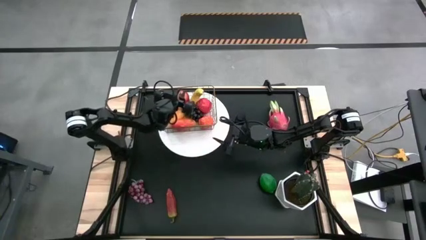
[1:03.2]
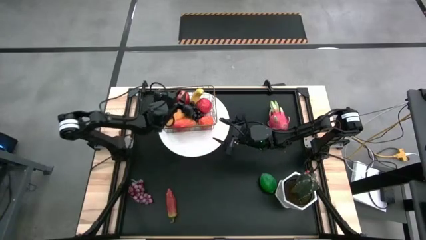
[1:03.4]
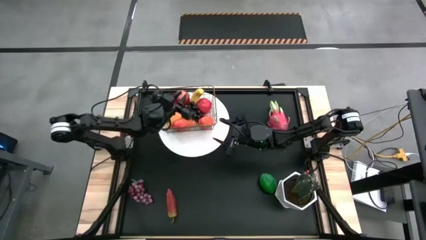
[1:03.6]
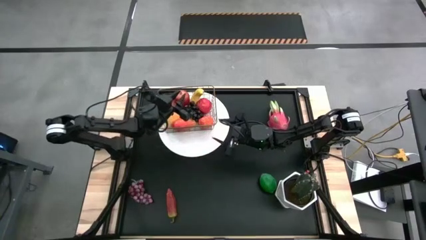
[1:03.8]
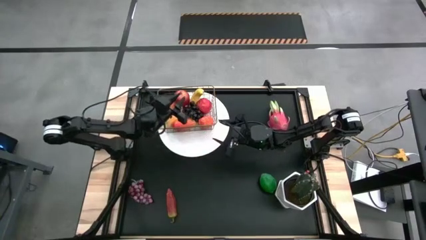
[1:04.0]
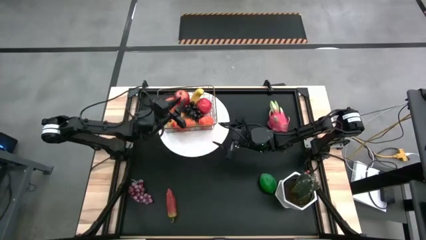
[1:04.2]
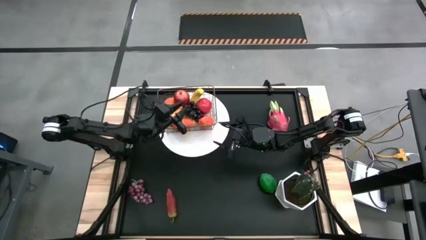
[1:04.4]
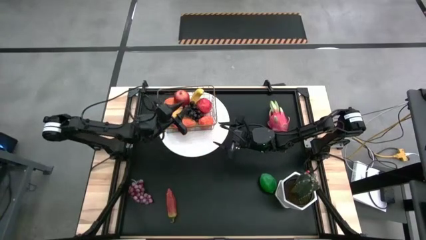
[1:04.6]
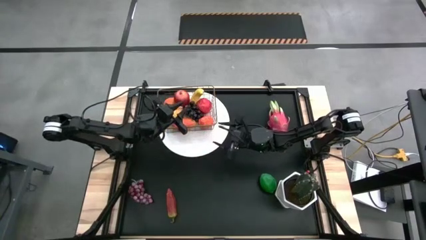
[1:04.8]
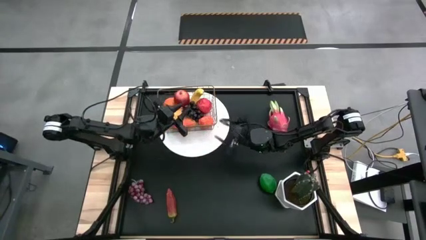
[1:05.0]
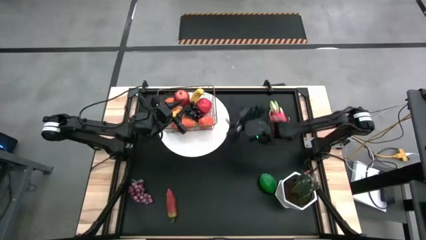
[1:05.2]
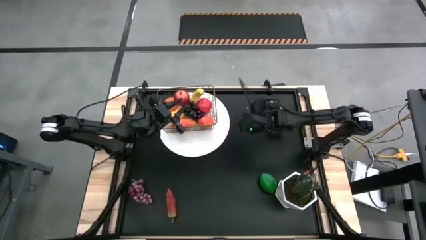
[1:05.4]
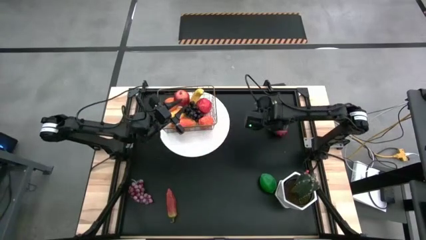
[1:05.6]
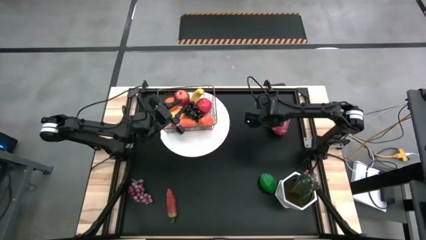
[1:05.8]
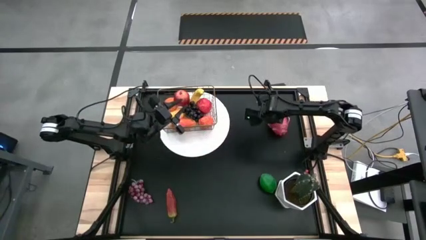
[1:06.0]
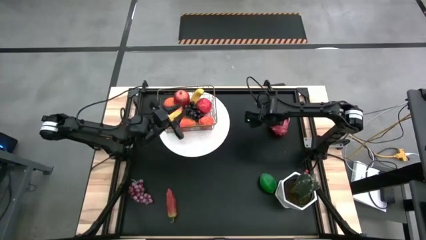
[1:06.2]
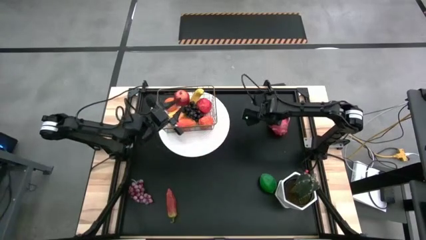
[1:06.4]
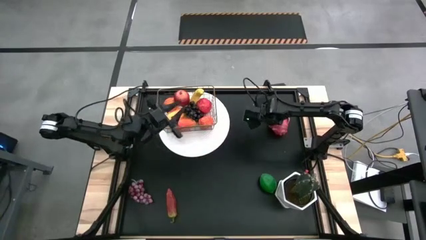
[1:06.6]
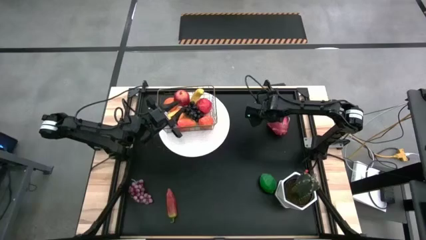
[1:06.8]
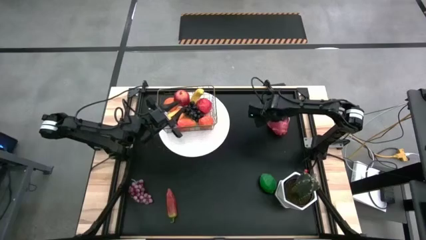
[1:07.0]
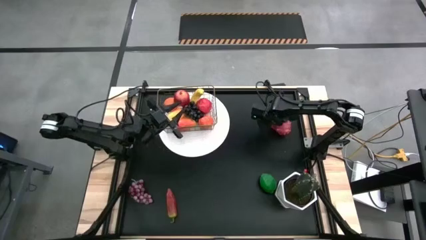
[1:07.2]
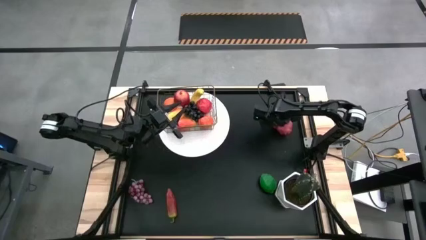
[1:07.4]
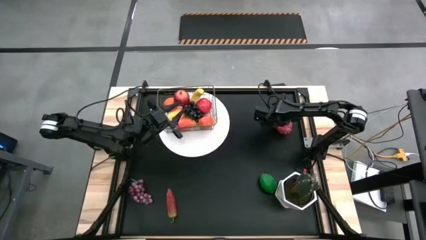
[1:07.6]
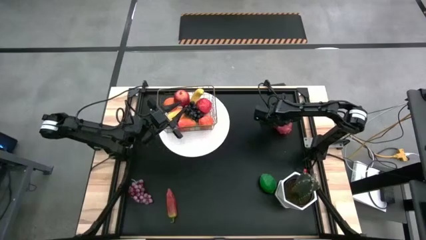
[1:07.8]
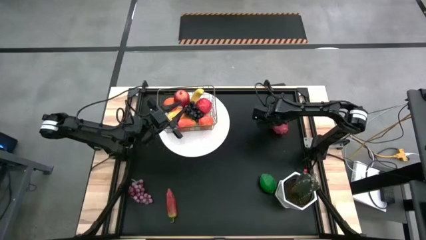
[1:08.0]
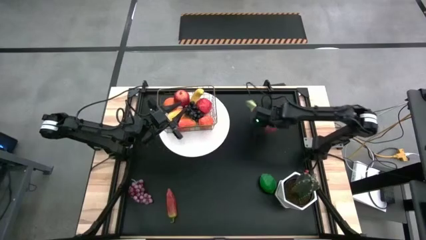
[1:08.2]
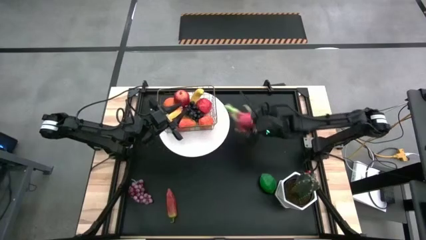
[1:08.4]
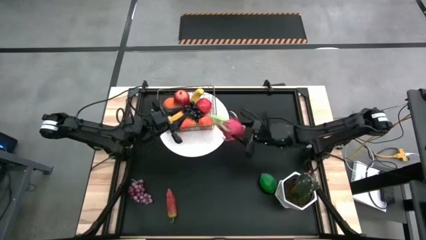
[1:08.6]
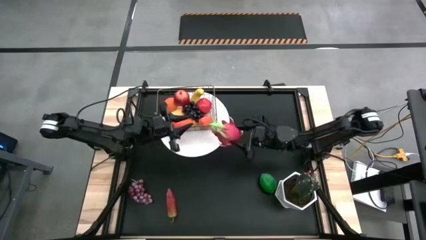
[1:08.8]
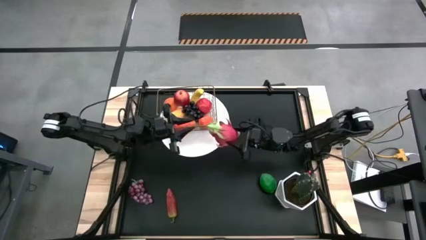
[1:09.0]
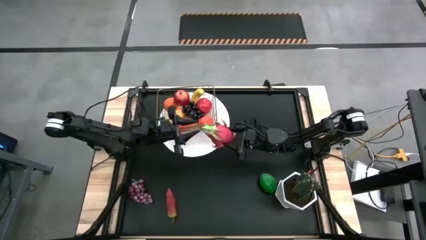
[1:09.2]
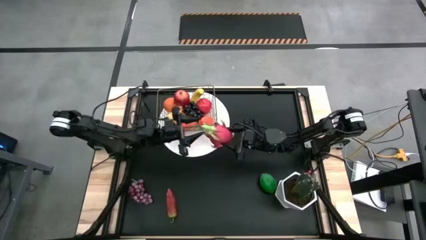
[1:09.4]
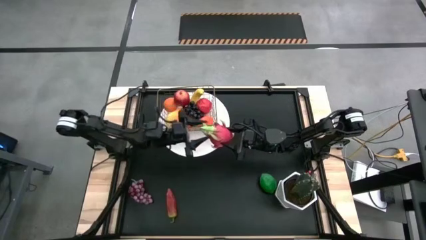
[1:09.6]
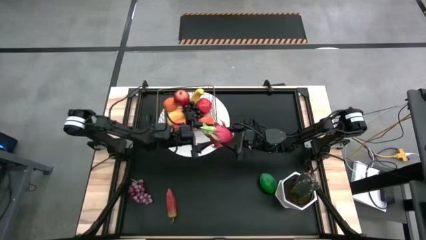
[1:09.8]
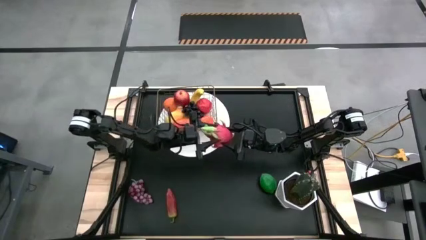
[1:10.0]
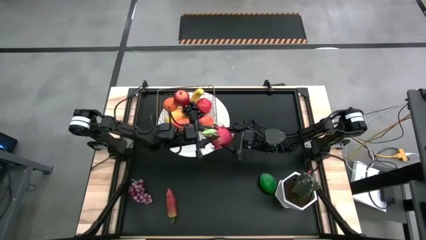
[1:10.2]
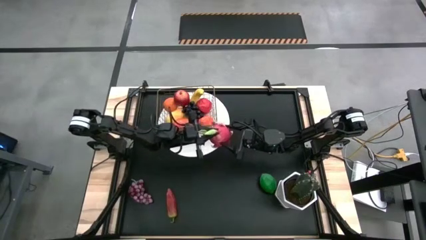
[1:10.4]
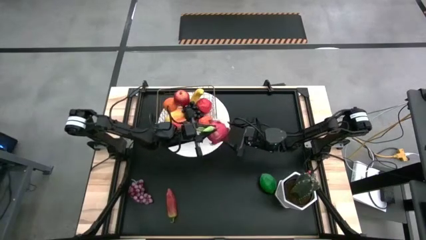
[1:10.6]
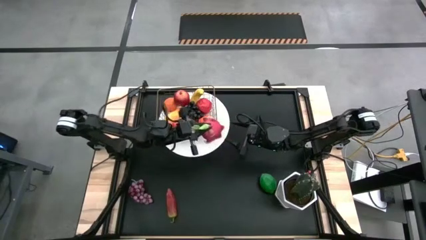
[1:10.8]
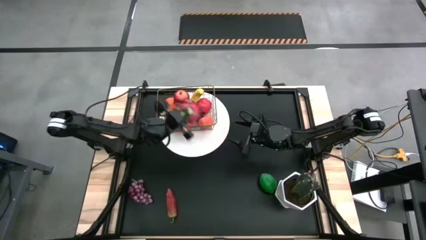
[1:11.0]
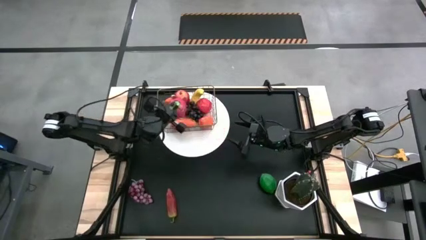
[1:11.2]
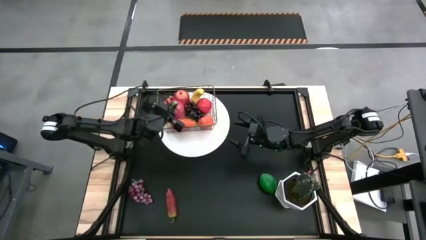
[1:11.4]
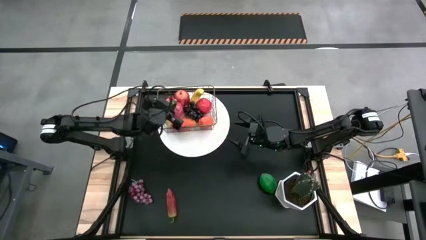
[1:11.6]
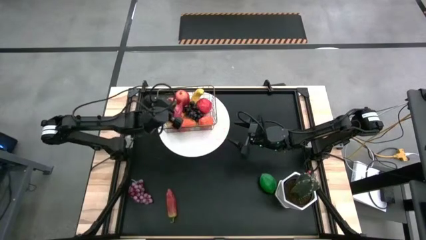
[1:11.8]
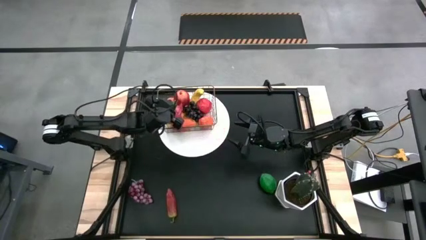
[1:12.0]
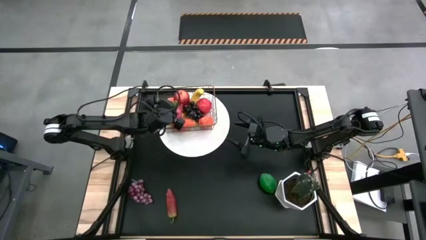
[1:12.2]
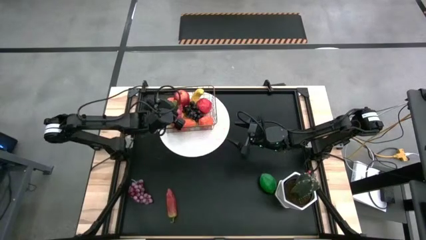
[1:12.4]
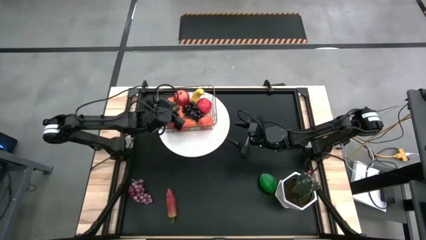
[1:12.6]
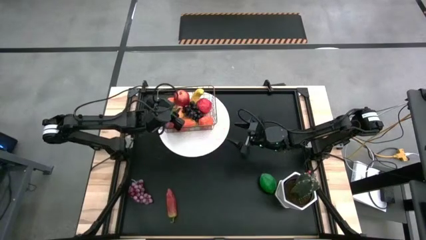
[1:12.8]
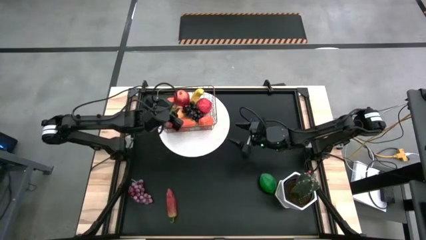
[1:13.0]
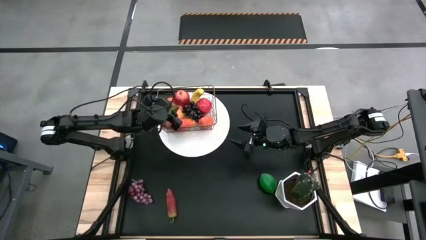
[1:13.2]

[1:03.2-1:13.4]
Task: Build produce basket
Put the dragonfruit into the wire basket

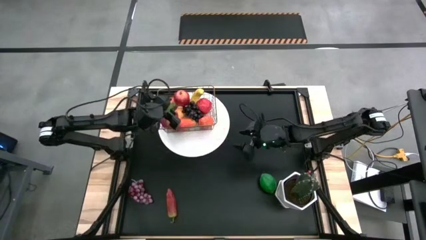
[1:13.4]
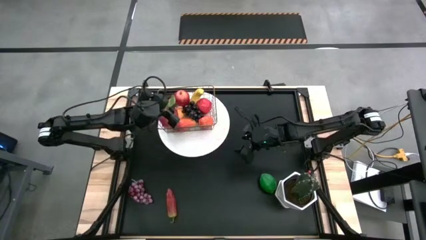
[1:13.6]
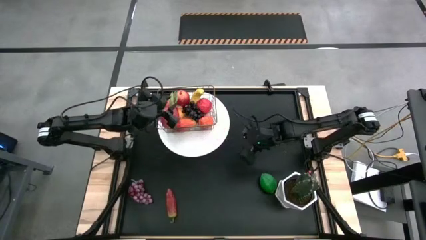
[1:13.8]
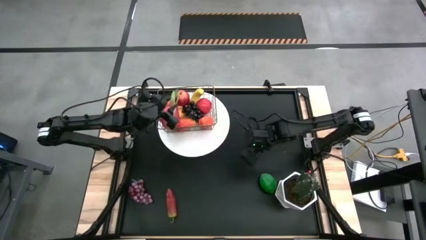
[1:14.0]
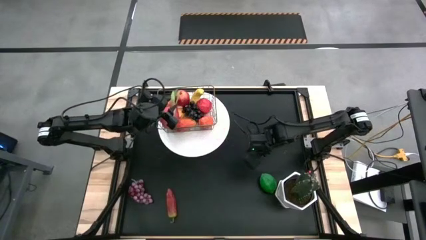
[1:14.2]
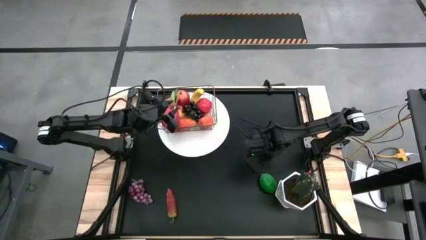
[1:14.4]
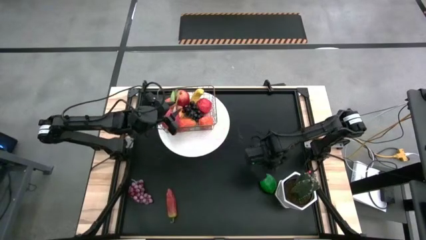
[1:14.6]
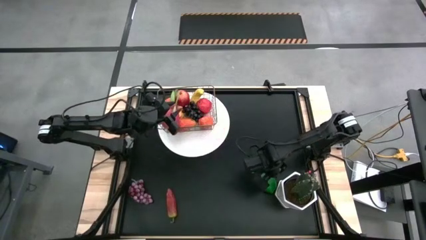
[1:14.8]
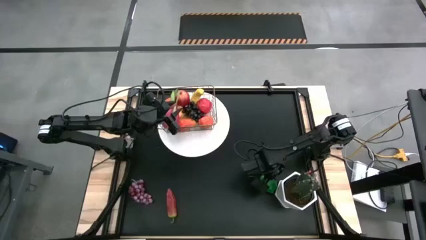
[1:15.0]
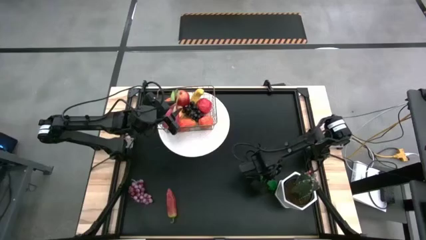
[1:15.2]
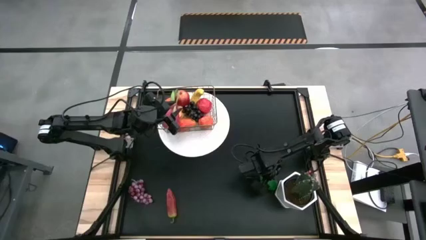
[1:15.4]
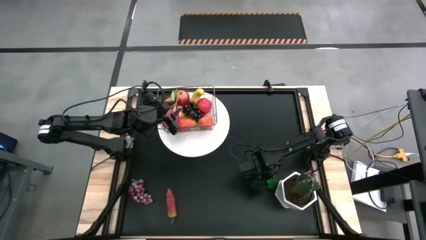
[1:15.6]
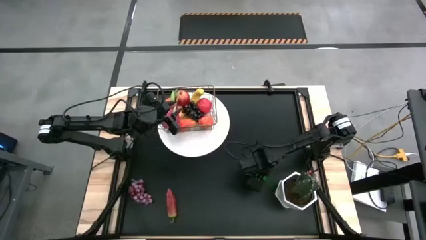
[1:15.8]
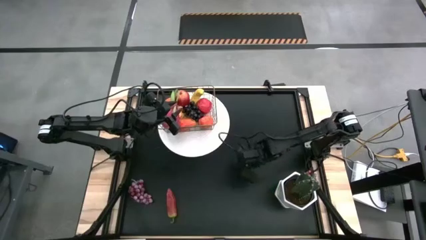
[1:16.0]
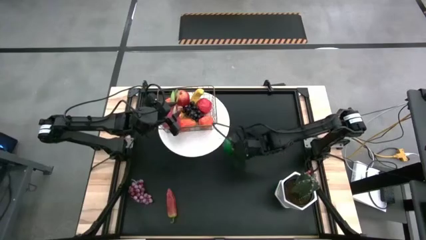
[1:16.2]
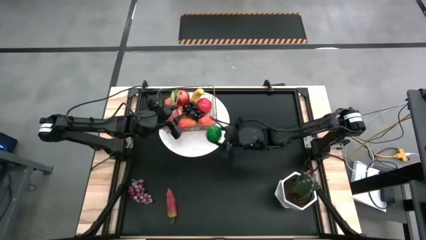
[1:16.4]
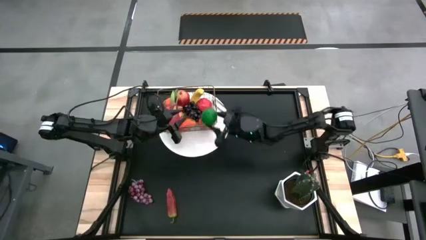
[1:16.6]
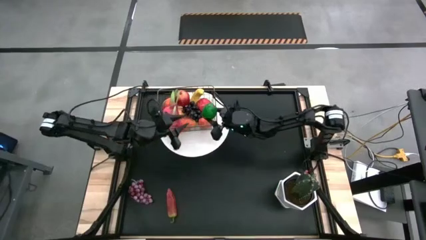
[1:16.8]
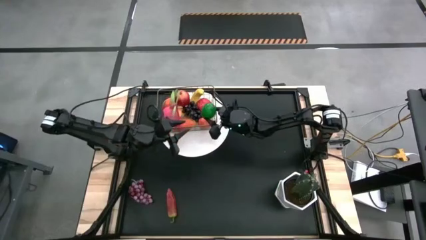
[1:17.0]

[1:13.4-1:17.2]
Put the lime into the wire basket
